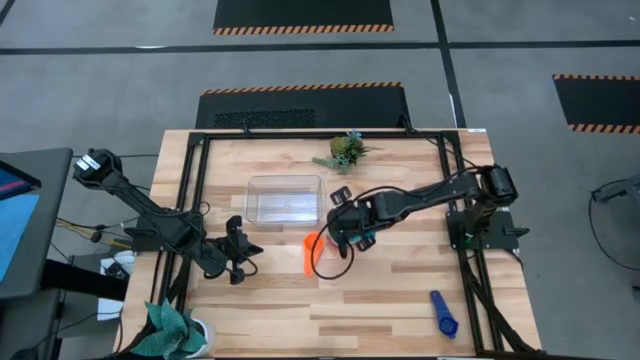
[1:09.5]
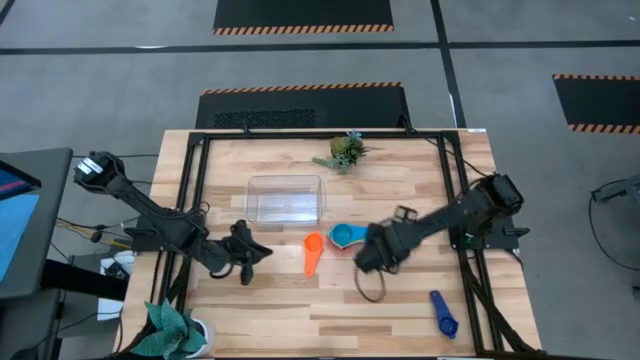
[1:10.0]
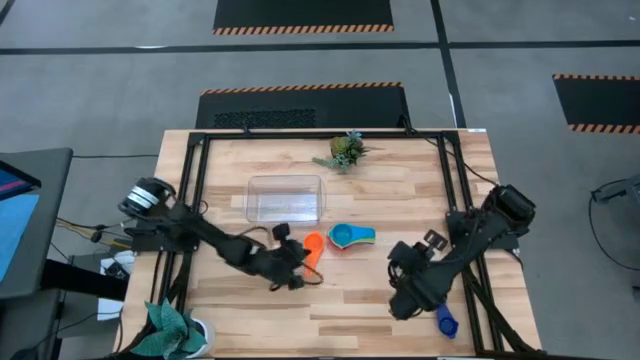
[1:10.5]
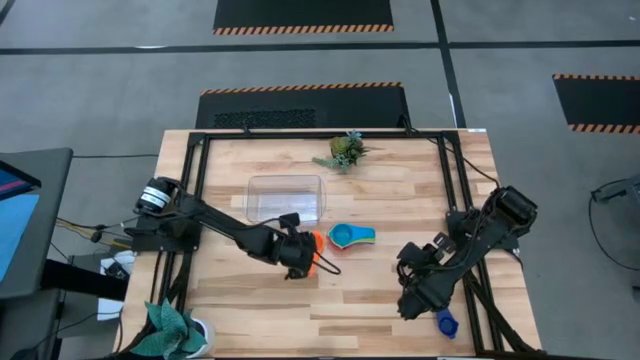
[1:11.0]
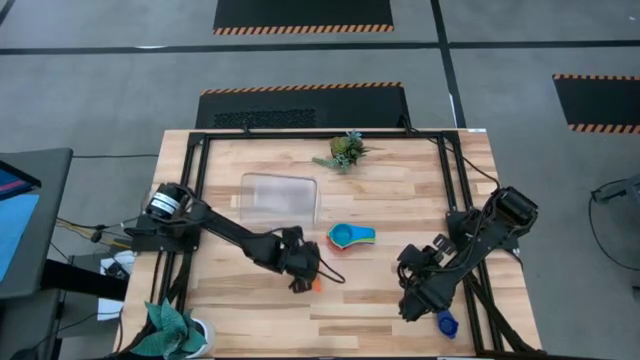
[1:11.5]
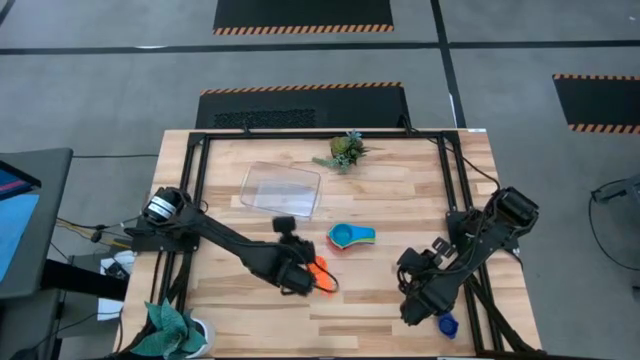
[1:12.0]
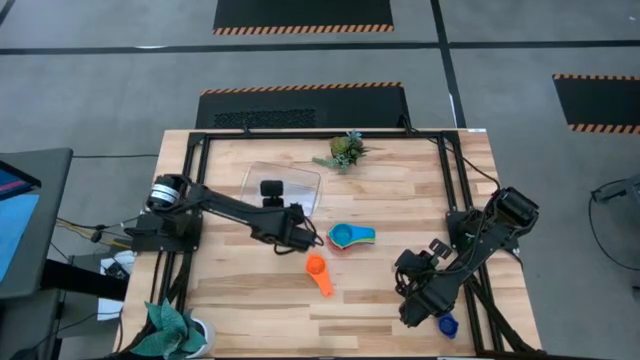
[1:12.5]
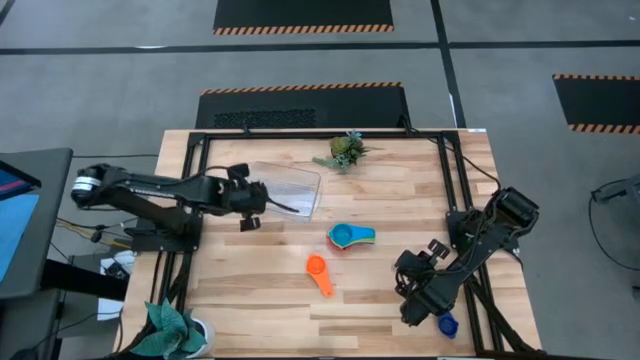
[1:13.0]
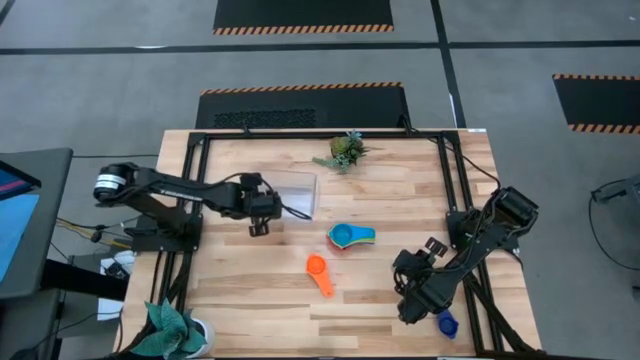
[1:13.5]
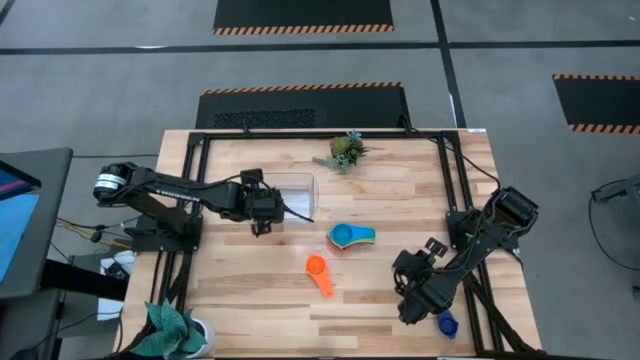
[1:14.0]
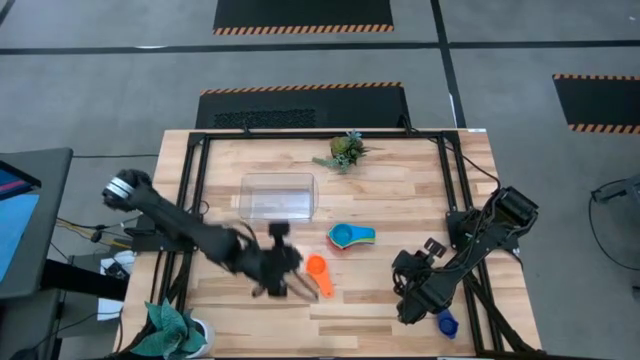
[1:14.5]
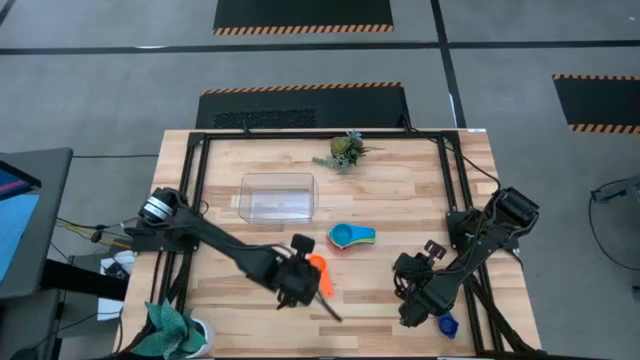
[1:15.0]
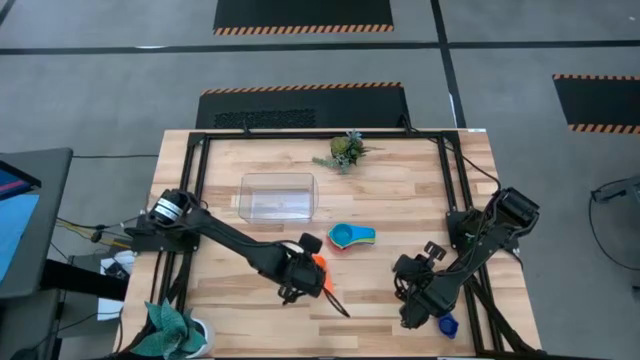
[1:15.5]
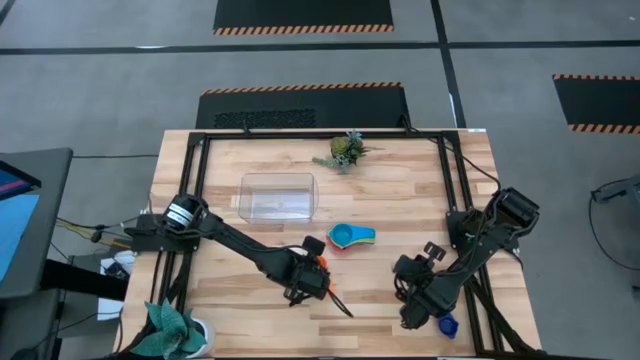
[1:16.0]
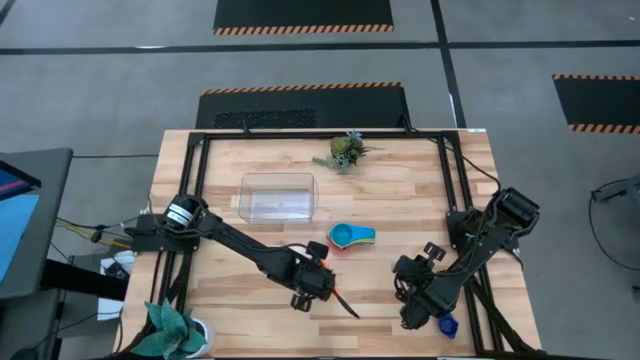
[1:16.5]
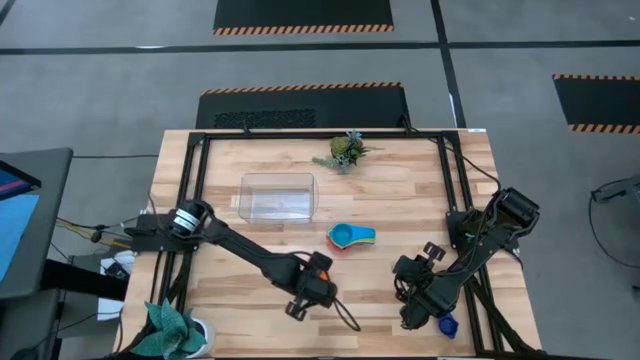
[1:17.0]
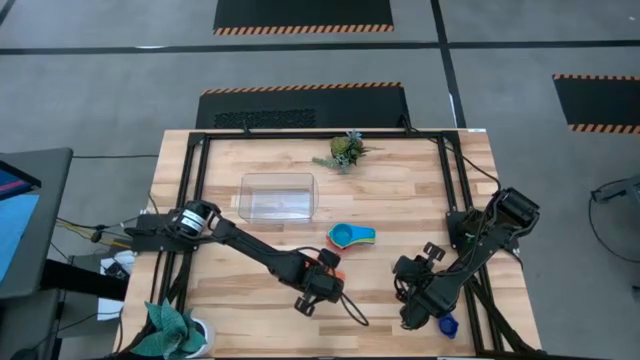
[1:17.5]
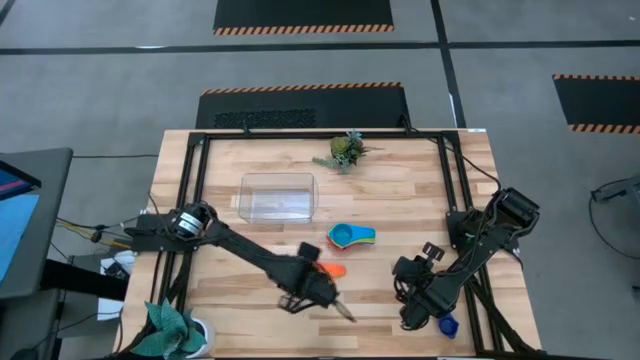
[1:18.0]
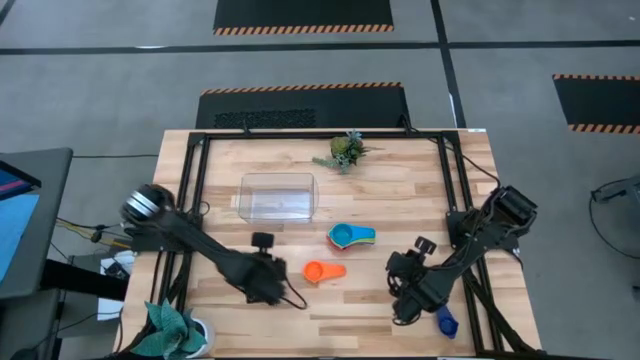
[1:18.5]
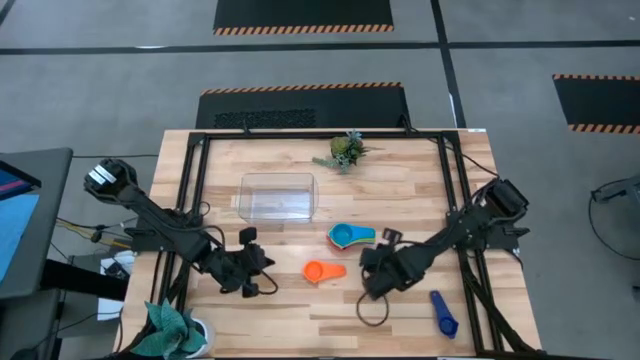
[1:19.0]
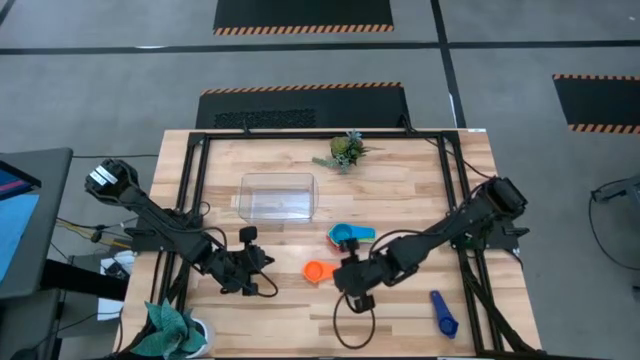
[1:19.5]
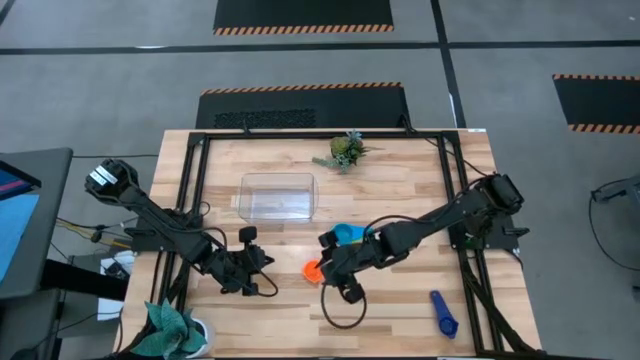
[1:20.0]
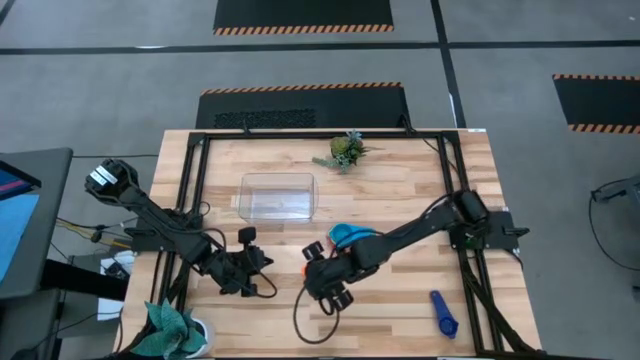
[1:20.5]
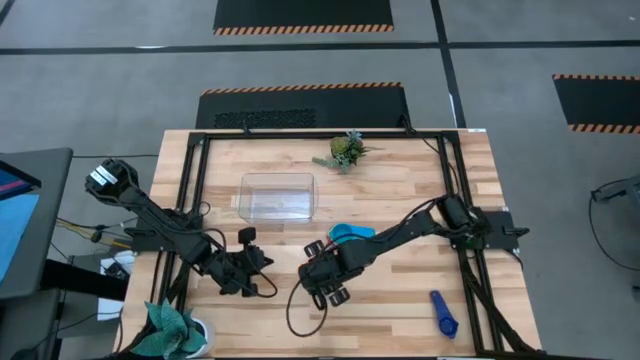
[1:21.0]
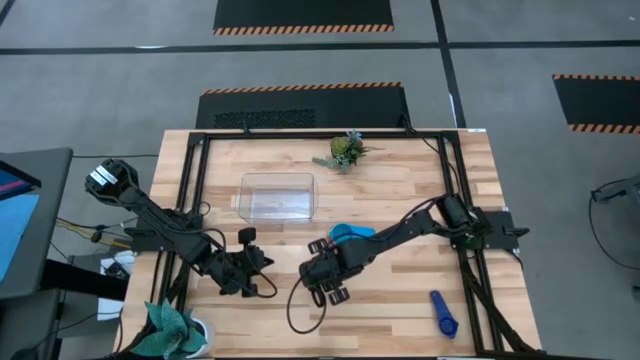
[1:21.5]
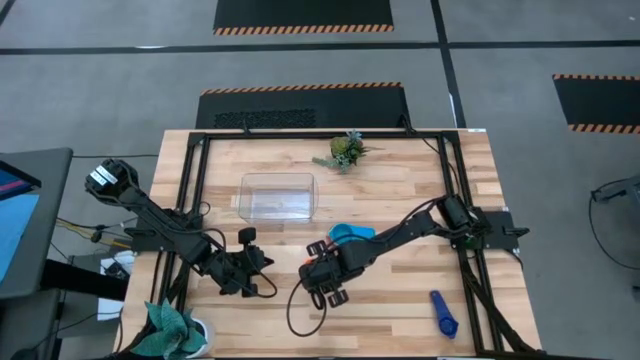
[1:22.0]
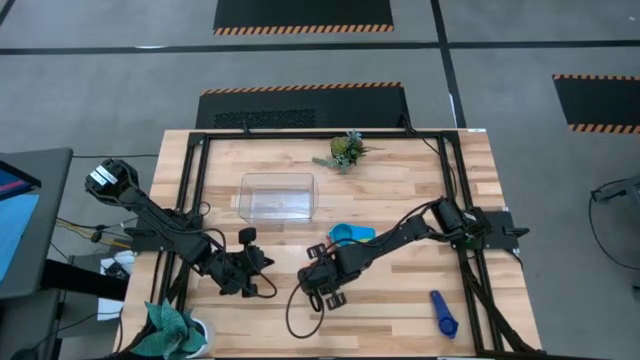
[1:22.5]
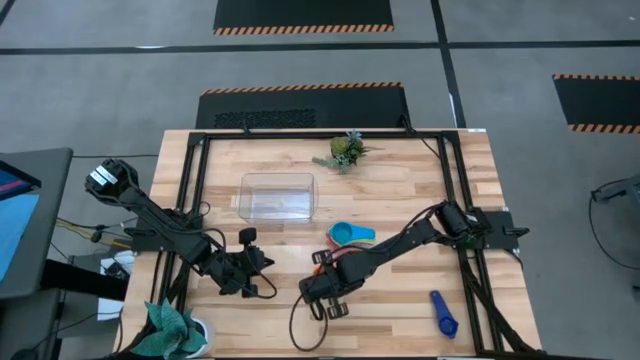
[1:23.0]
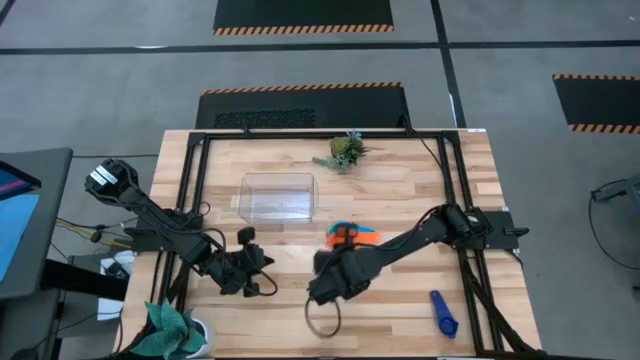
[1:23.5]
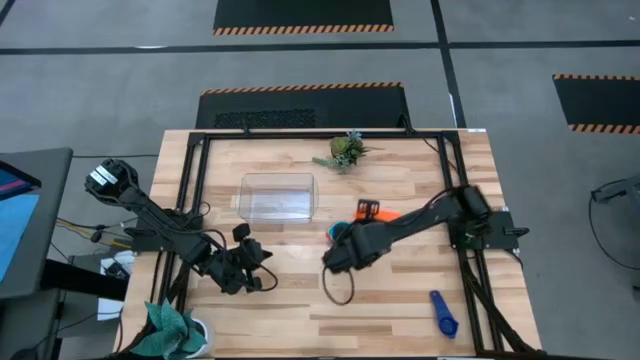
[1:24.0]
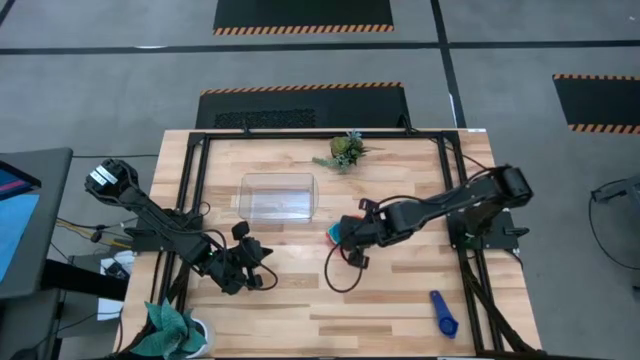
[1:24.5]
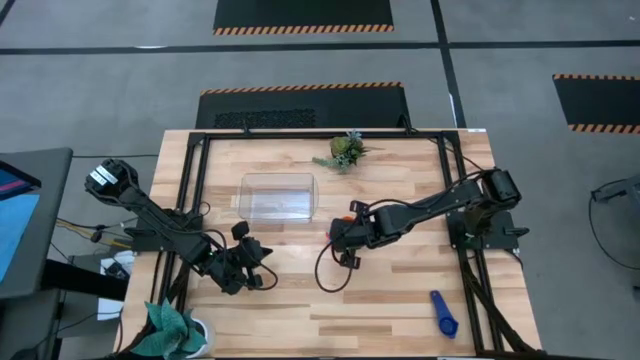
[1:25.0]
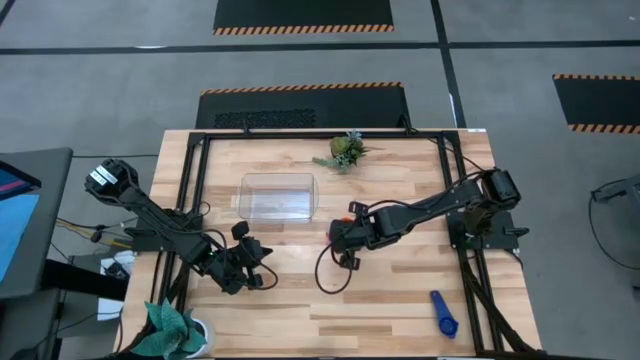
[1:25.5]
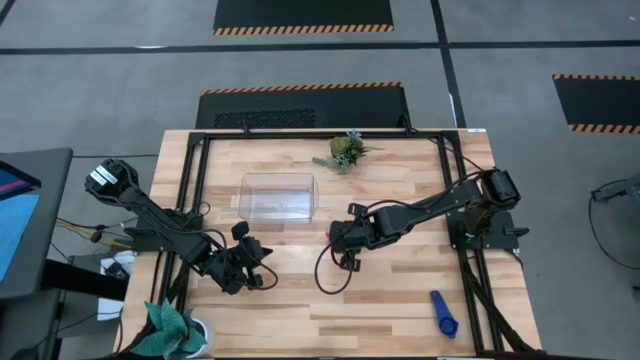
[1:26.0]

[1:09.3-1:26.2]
Task: Nest measuring cups in basket
Stack the orange measuring cup on top of the light blue measuring cup

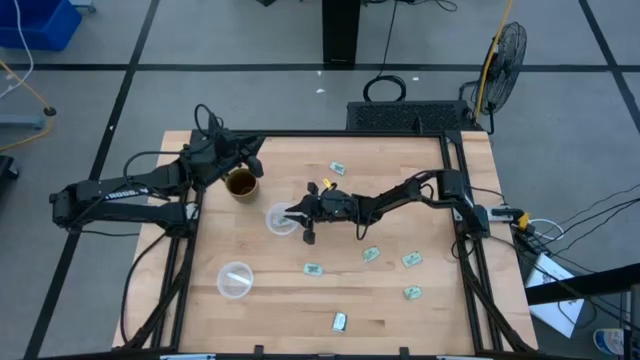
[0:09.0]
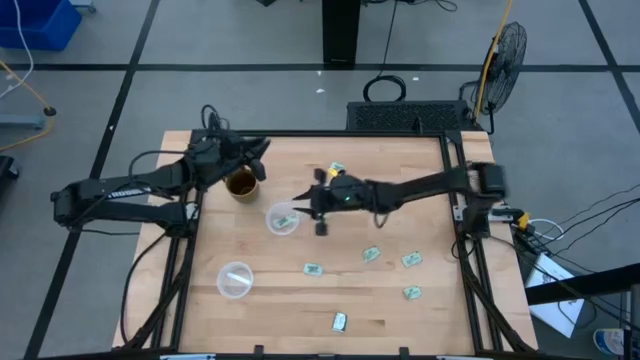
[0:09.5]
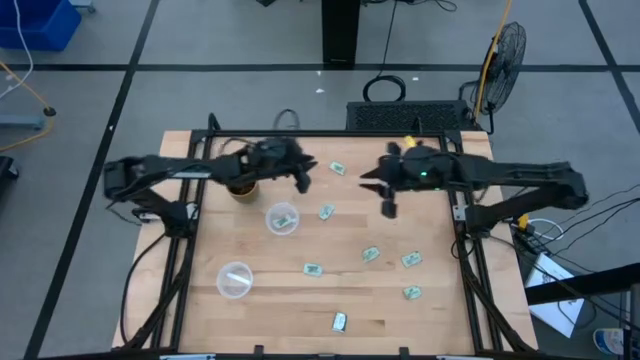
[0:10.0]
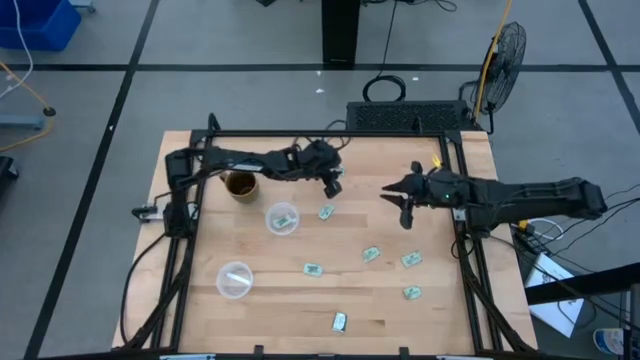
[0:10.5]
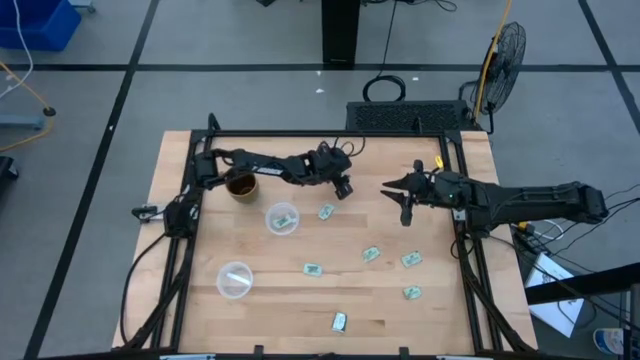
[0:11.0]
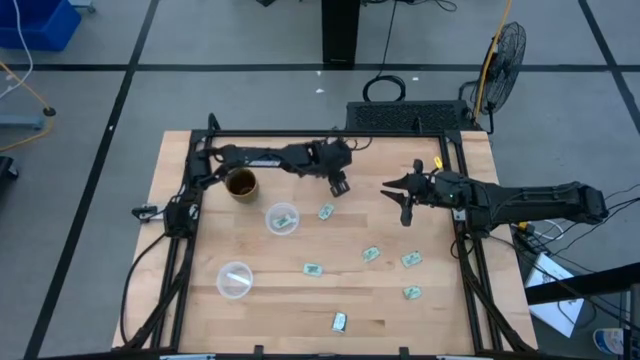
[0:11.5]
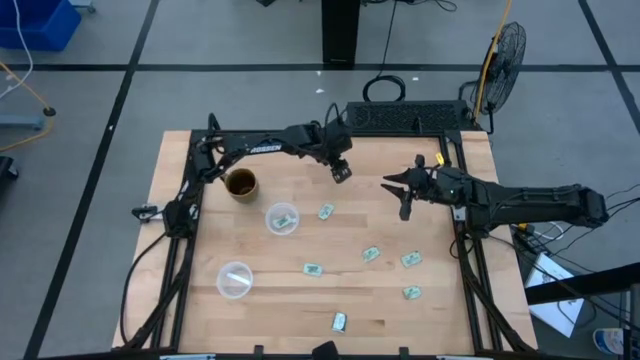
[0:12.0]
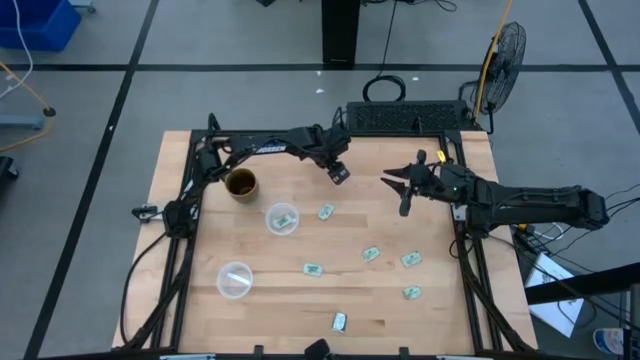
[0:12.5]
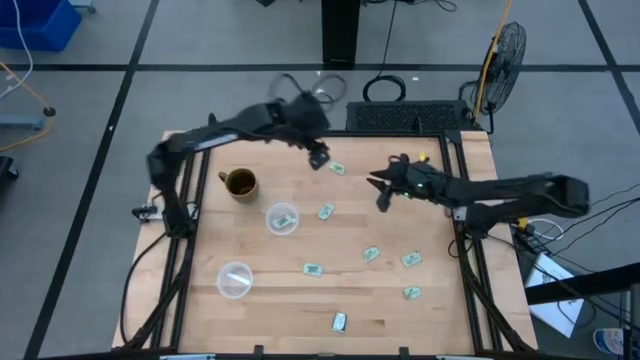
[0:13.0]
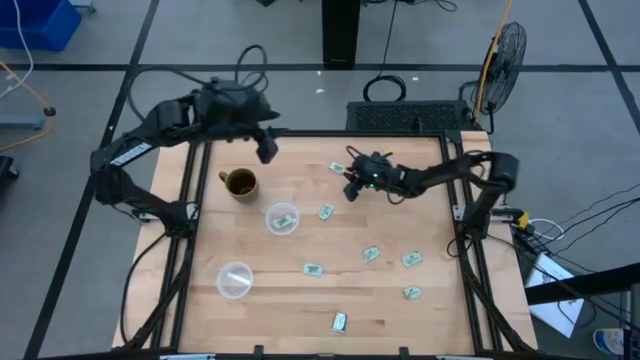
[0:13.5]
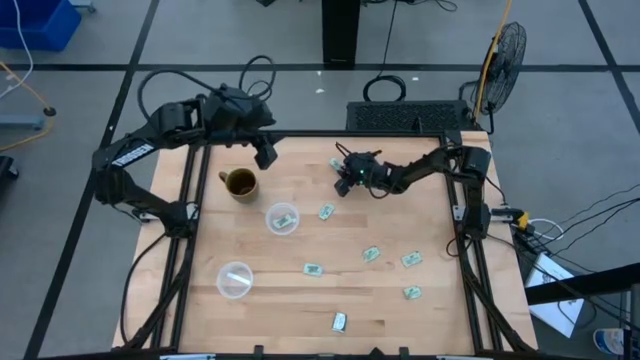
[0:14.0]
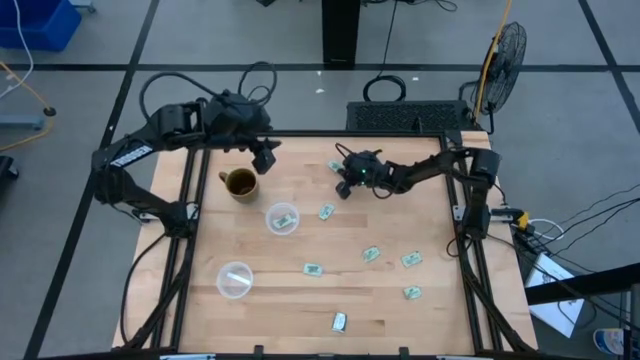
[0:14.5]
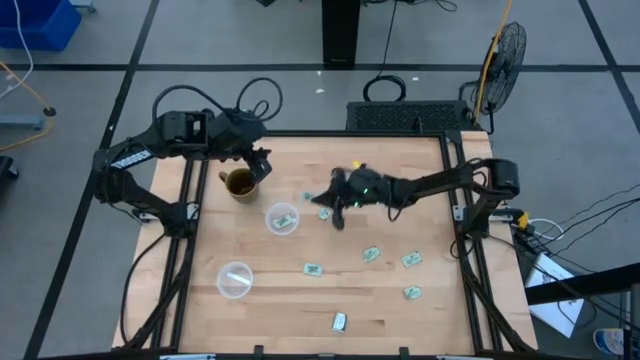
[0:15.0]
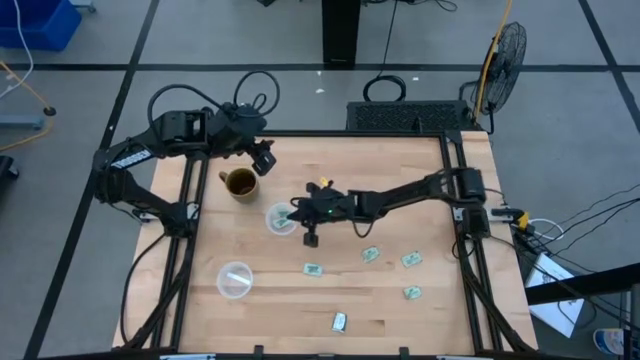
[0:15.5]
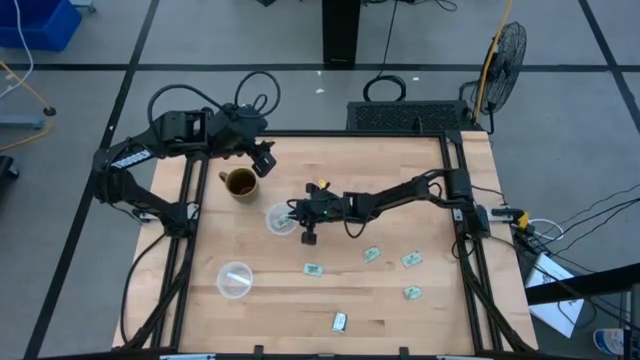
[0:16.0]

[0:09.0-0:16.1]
Task: Pick and place Stevia / Truvia into bins
Put the stevia packet into the top transparent container
